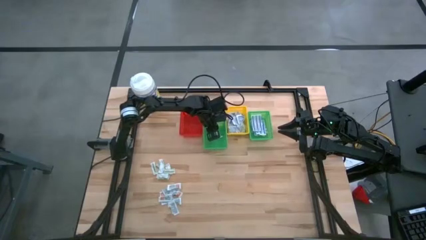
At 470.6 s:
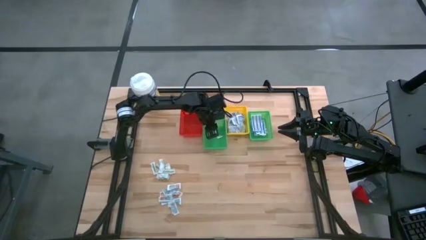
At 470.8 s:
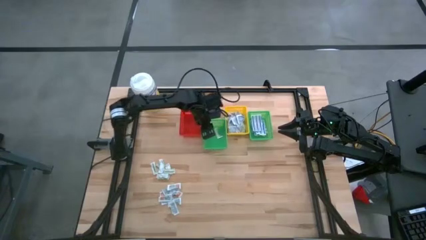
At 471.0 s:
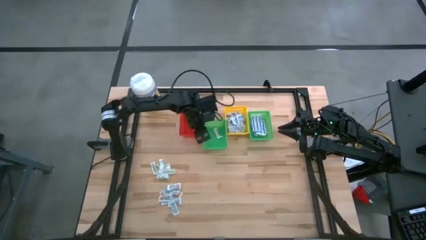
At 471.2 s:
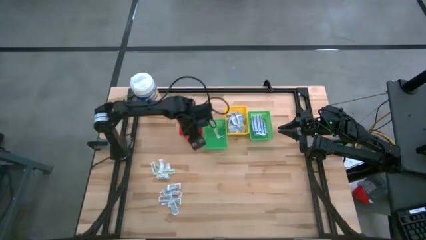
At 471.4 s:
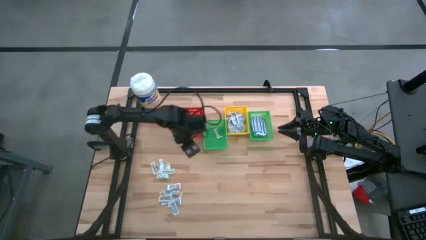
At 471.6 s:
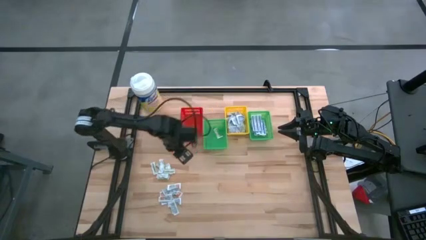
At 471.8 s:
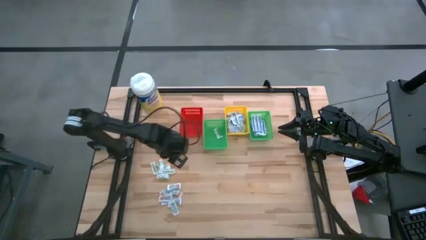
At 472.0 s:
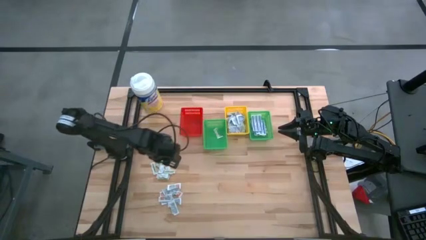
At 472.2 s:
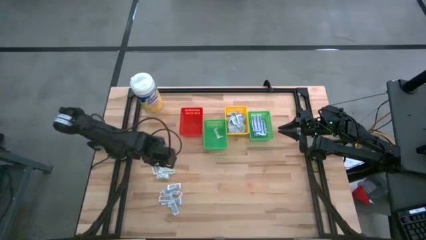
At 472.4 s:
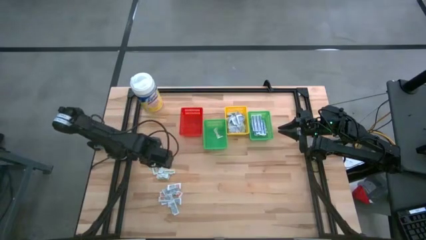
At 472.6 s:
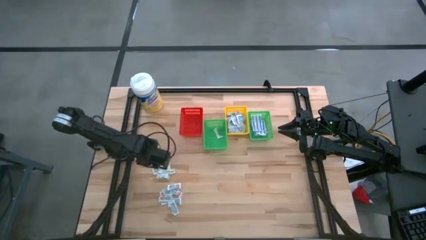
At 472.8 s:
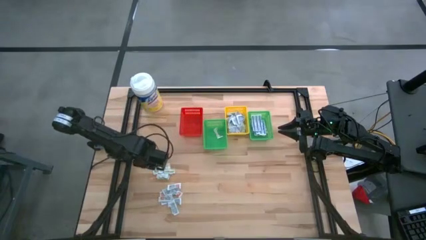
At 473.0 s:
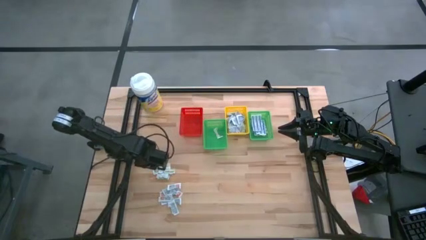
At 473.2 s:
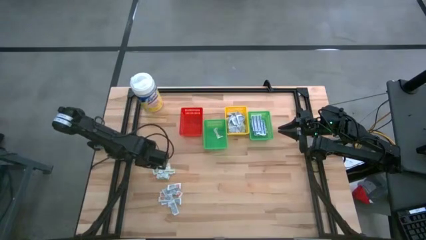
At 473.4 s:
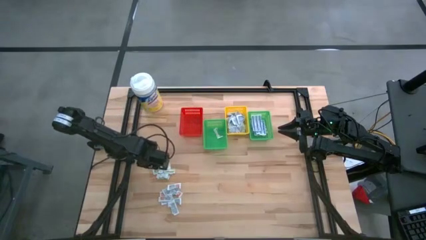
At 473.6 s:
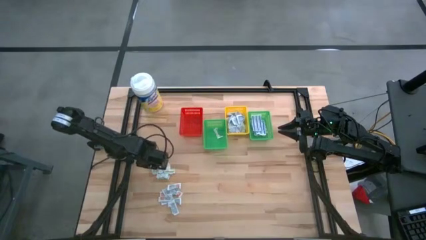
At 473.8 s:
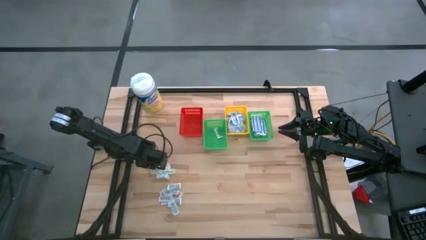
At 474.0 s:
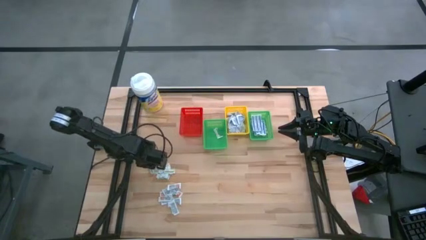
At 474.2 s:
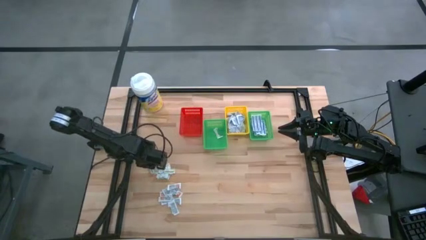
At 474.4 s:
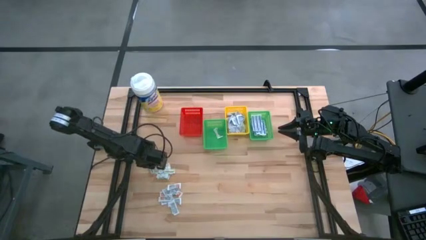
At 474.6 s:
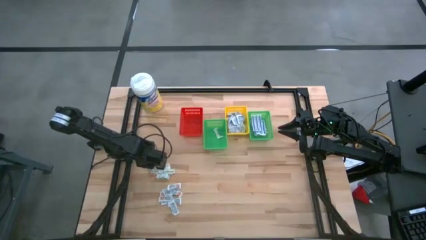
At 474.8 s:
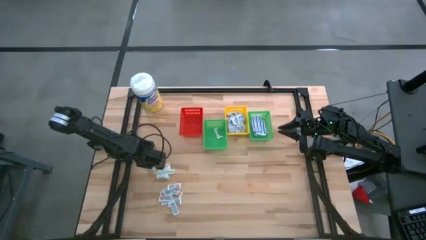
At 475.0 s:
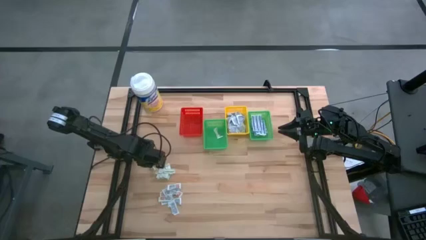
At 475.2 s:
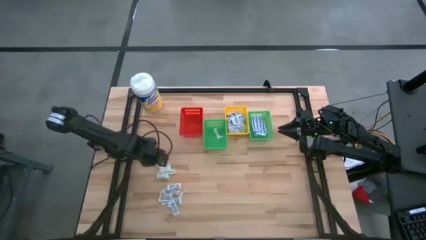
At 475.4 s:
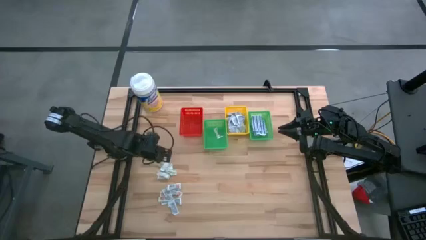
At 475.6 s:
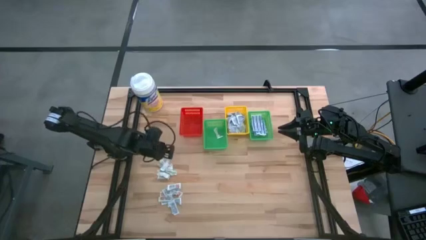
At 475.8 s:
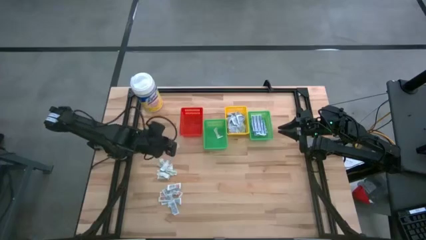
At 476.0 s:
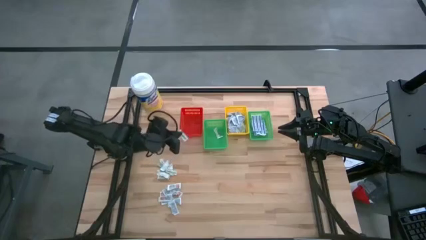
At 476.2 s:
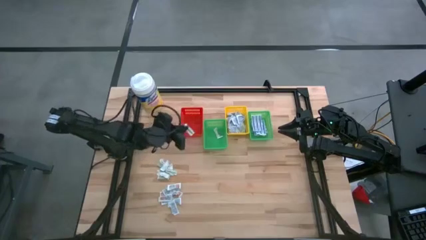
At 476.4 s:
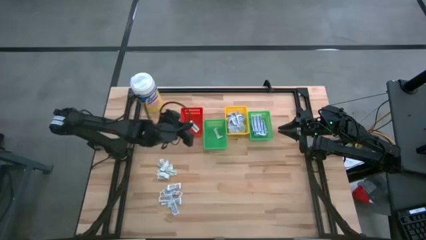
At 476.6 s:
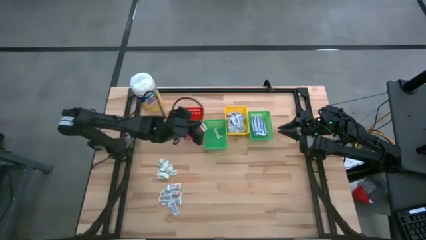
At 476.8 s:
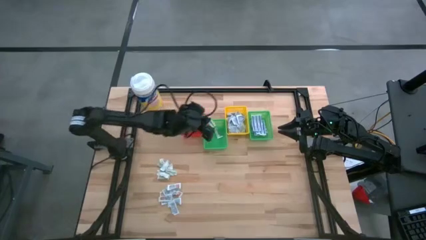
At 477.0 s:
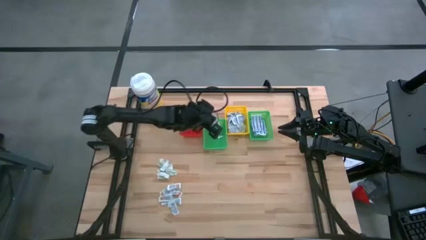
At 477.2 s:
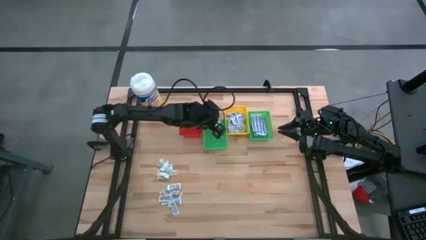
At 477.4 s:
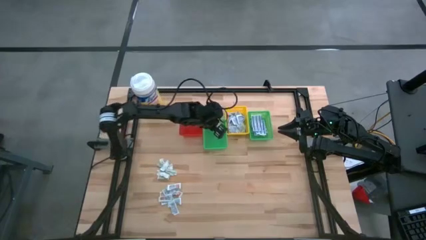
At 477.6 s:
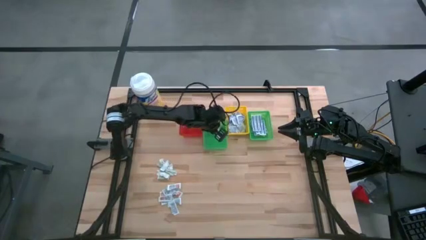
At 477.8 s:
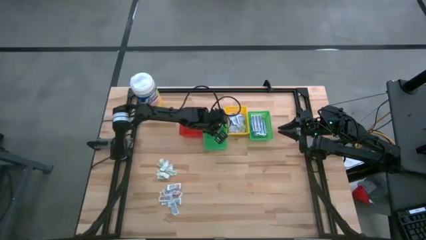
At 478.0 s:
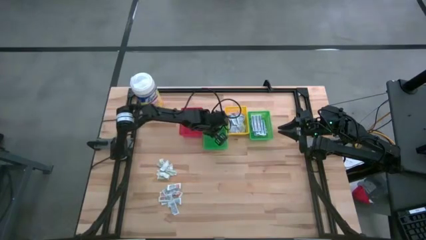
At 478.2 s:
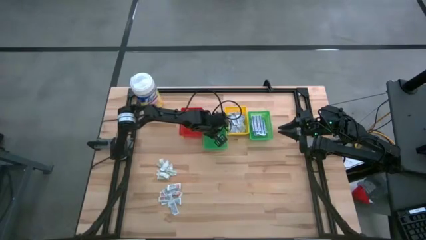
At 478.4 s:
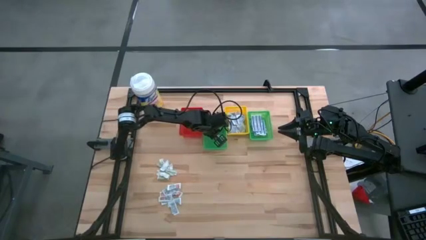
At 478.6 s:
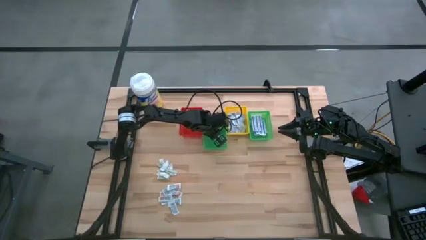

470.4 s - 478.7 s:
Task: Pick & Place First Aid Supplies
Put the green bandage into the left green basket

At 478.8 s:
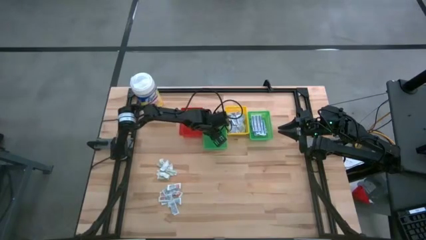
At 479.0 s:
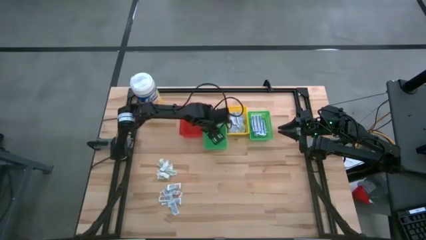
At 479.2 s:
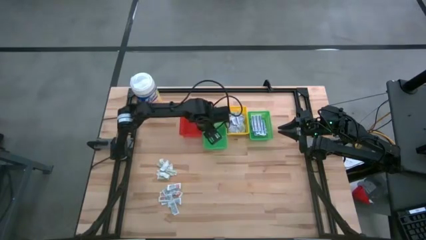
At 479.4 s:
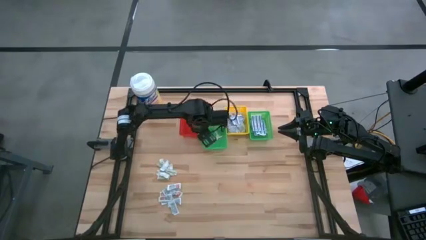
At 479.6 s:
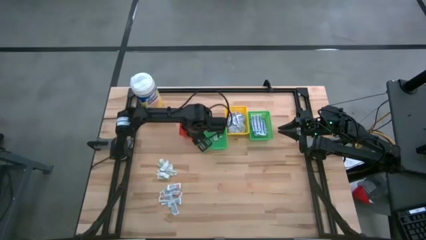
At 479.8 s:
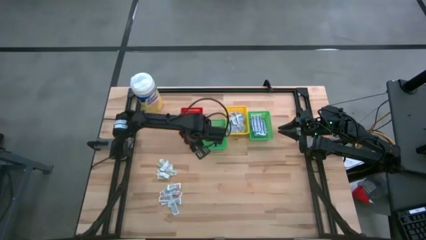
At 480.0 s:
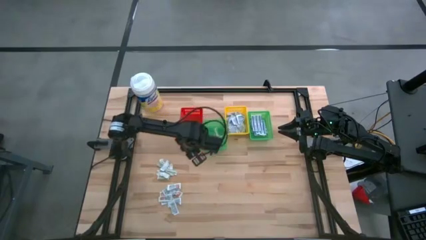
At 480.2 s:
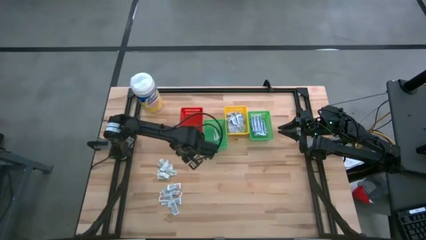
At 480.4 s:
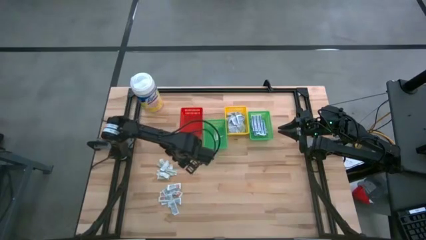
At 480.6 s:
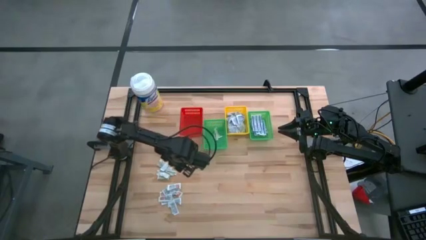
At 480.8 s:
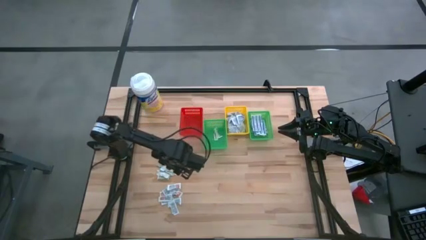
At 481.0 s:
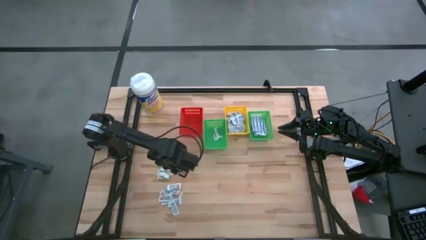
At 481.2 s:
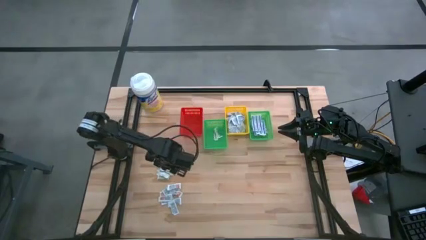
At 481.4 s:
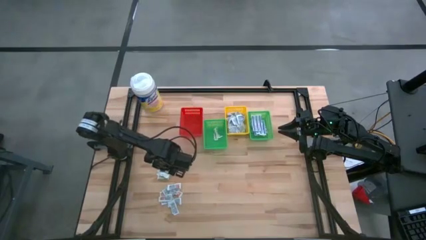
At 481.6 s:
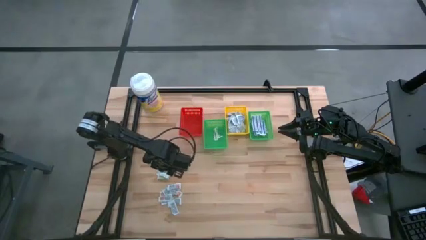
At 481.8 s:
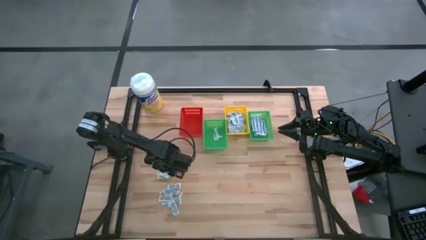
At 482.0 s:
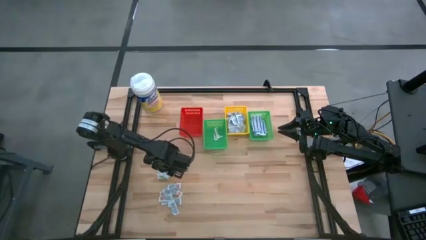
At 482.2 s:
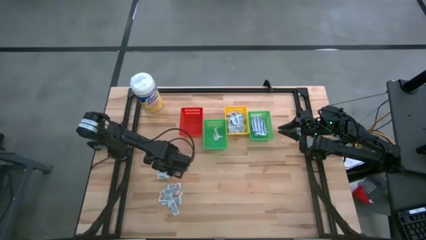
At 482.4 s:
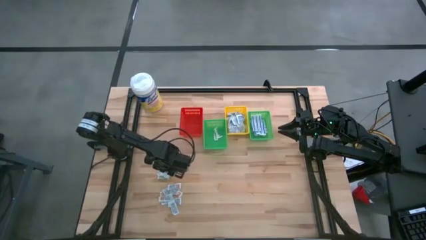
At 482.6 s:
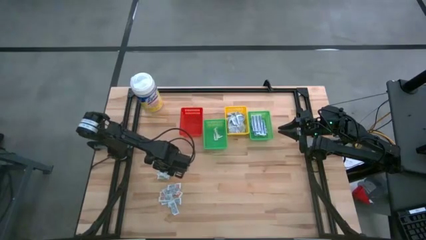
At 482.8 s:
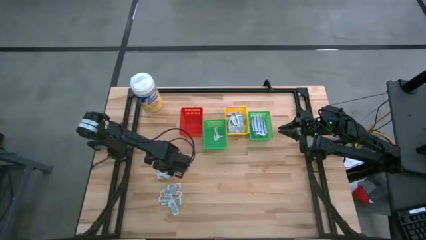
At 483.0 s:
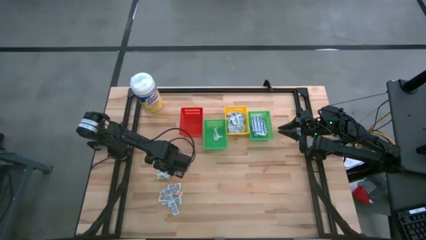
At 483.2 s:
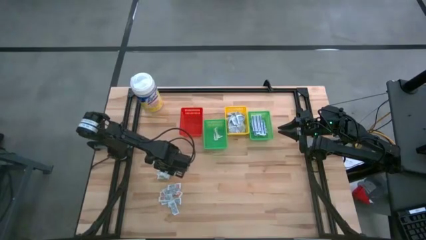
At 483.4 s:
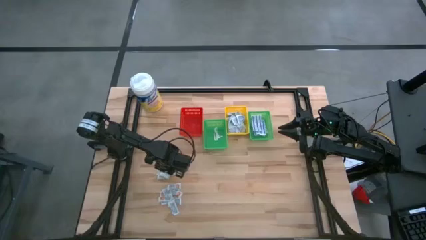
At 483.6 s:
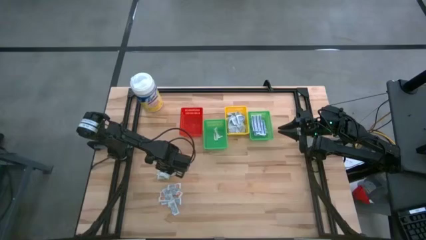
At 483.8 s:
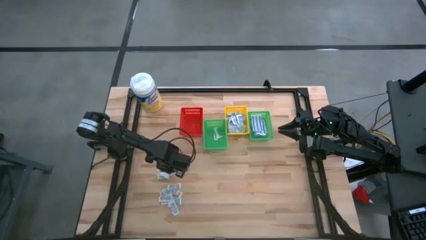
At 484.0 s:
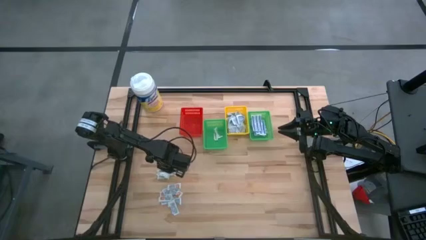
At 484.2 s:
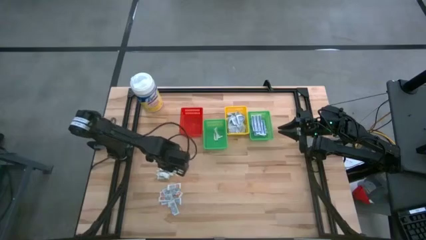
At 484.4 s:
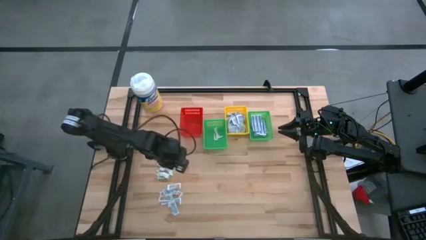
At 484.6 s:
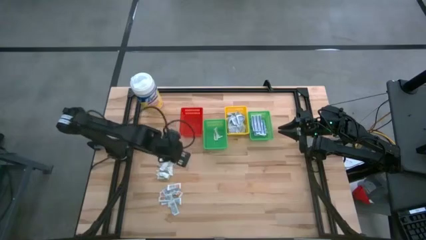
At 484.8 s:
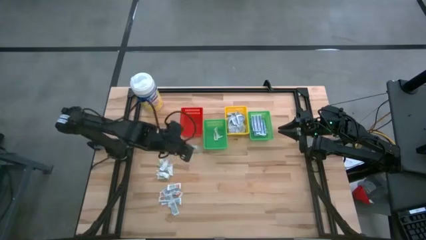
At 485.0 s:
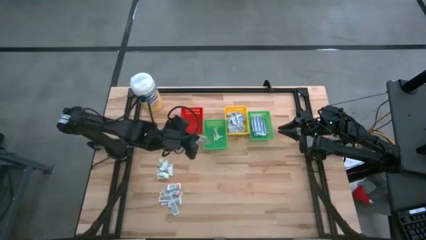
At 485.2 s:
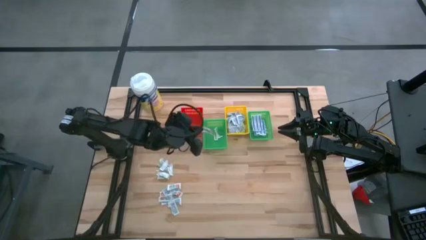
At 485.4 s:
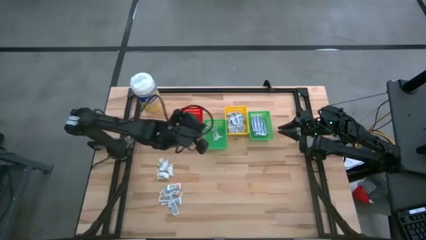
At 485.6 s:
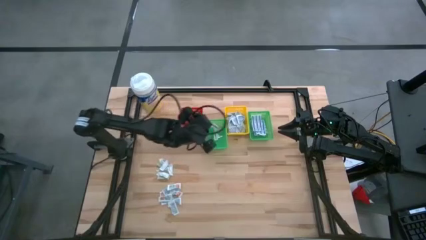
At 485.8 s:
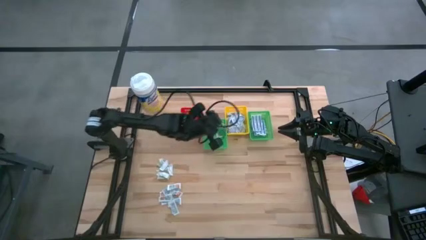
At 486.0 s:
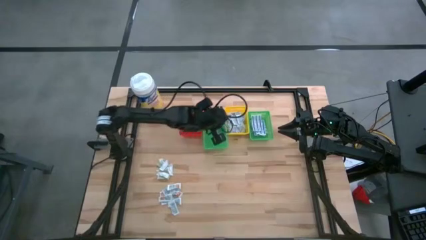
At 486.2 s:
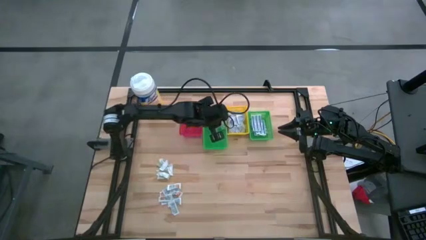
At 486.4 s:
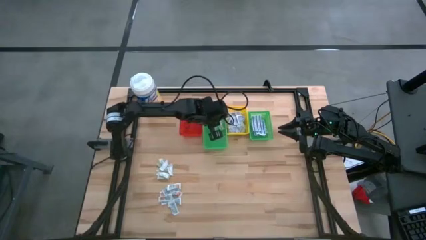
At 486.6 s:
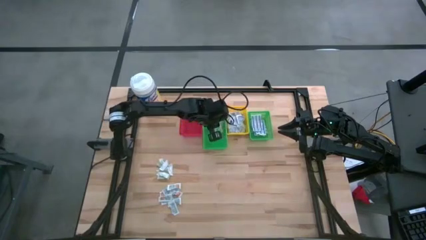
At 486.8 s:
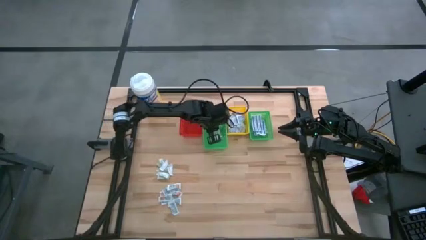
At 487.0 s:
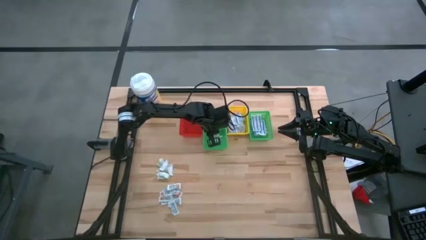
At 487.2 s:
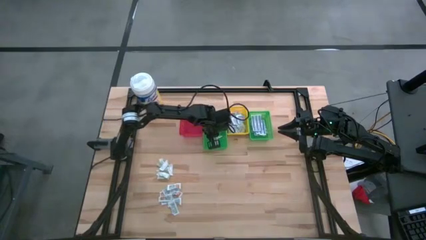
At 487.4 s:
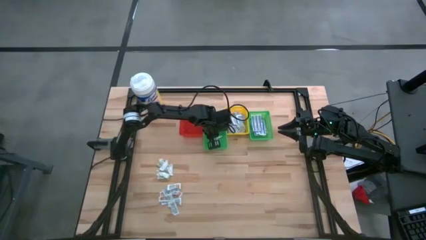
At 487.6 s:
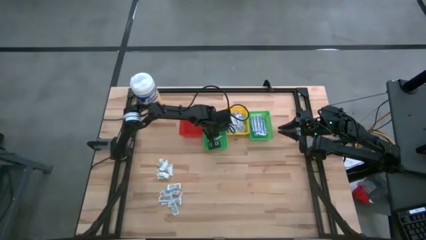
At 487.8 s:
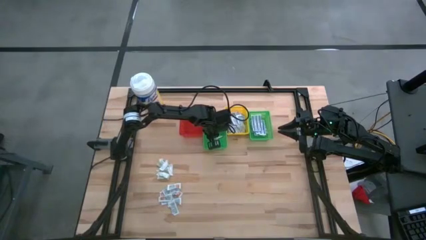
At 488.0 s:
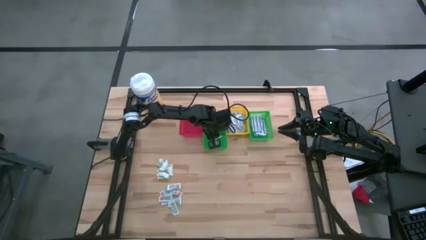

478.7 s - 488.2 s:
Put the bandage into the left green basket
